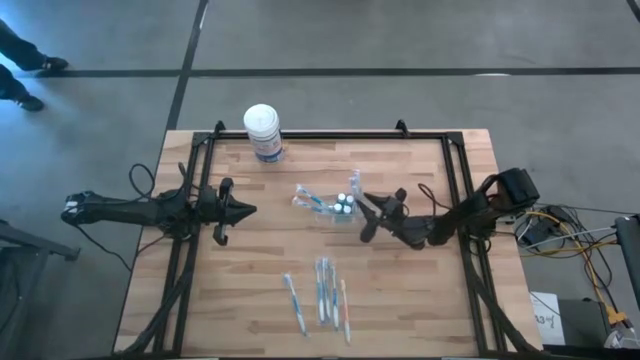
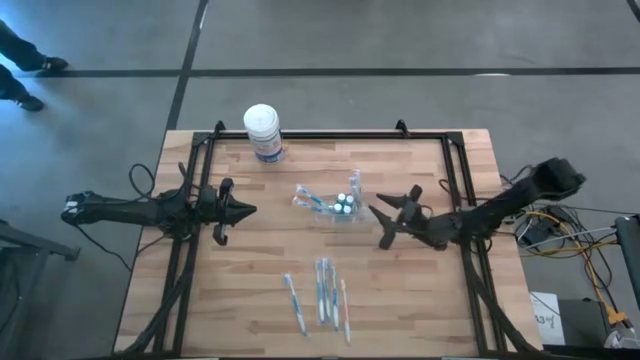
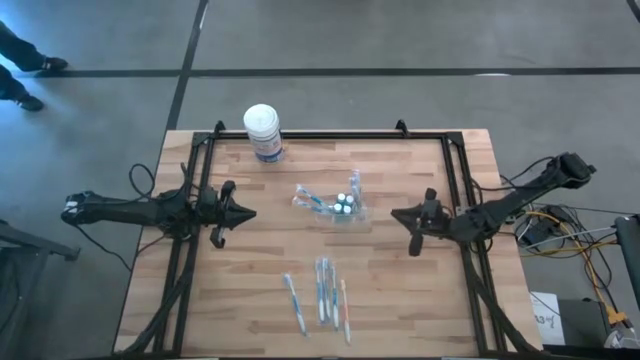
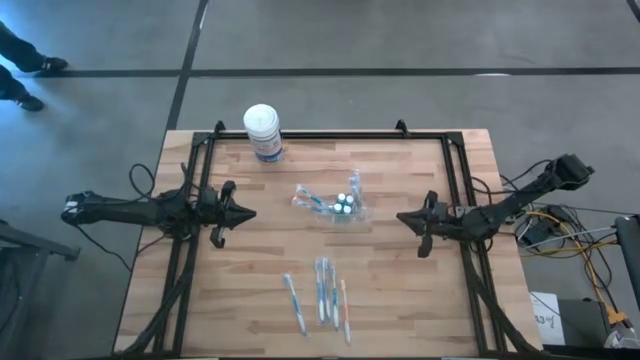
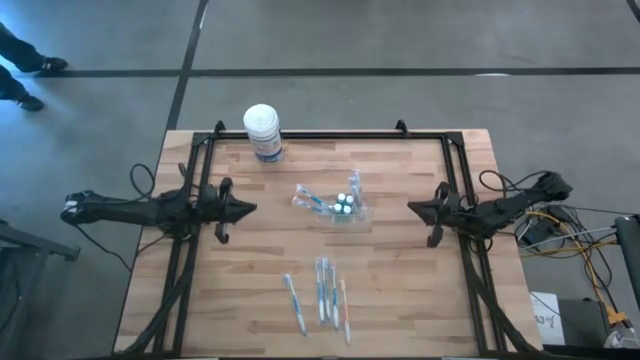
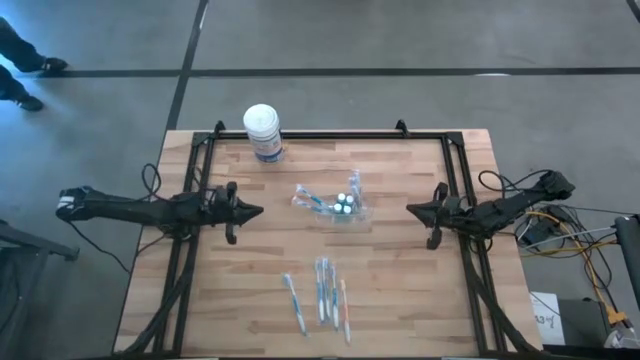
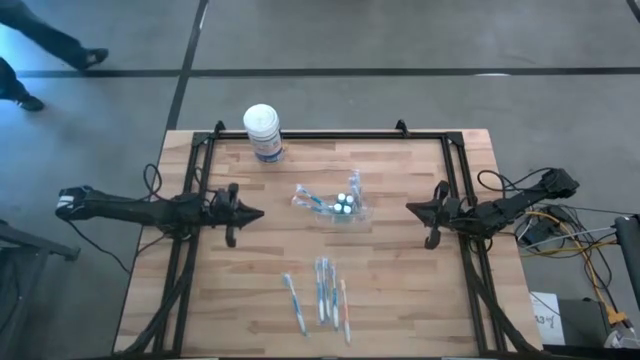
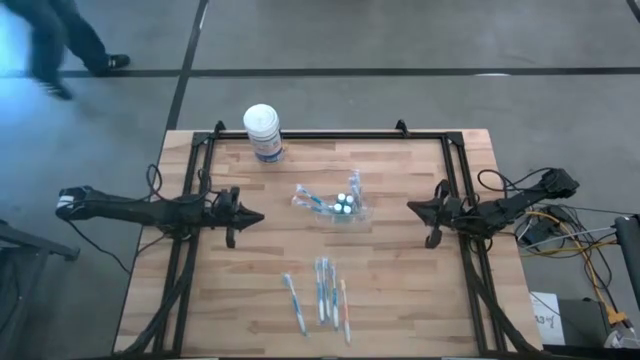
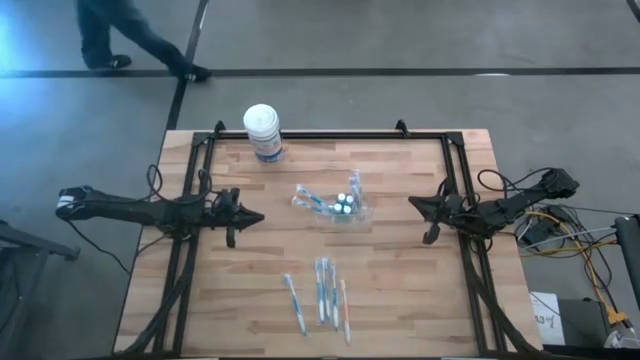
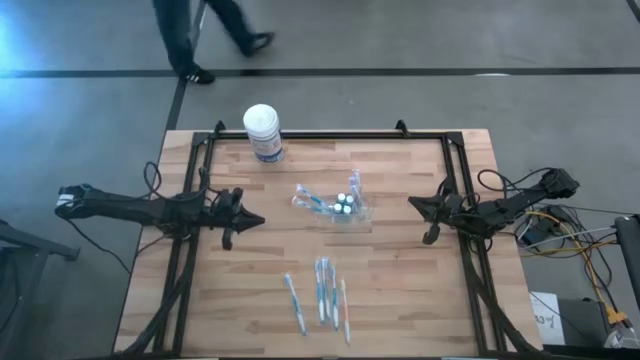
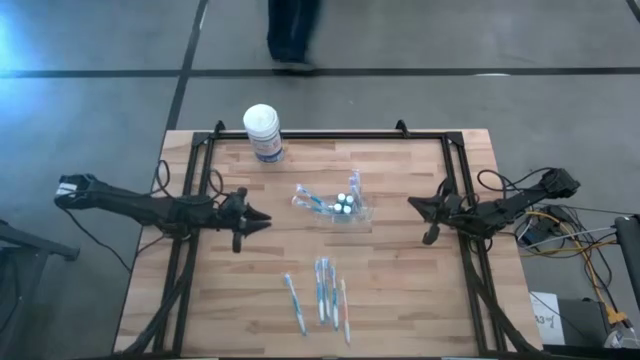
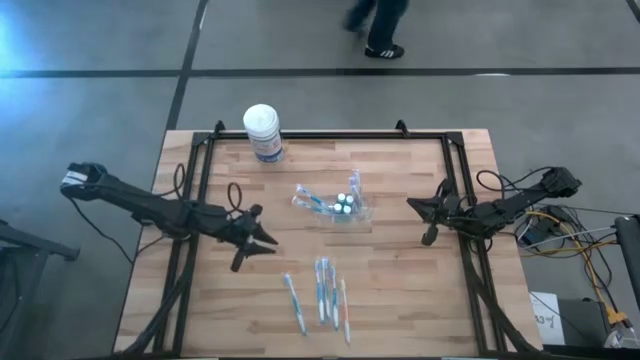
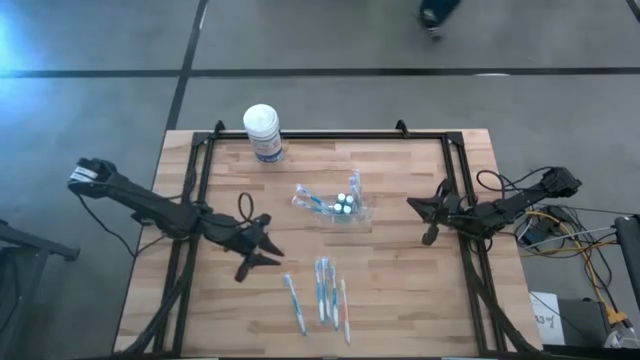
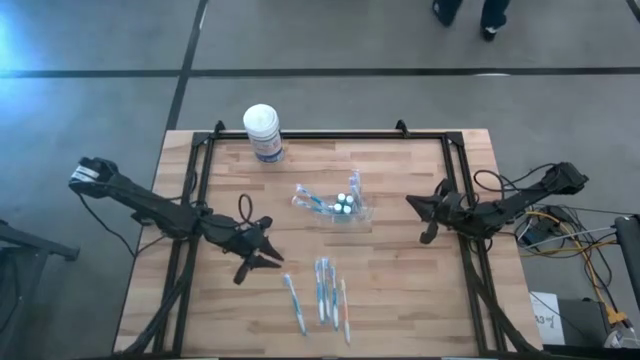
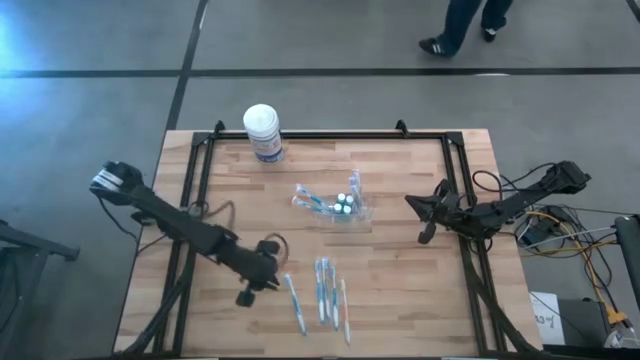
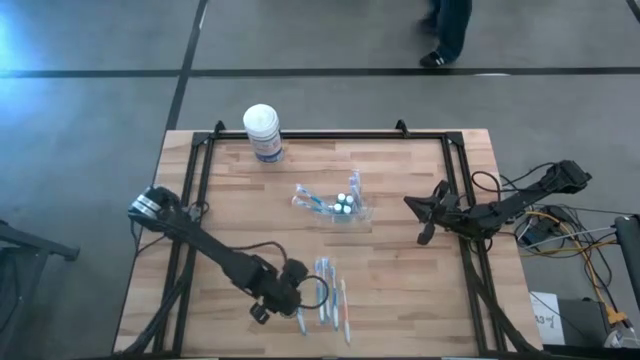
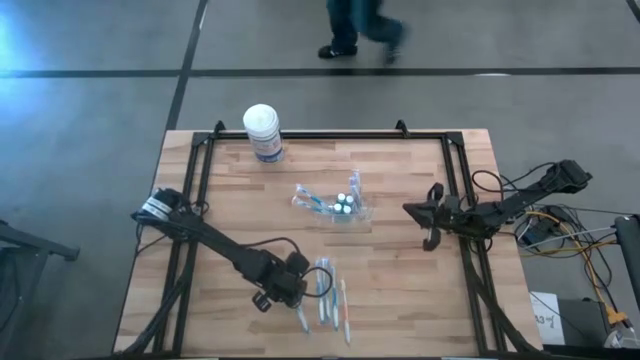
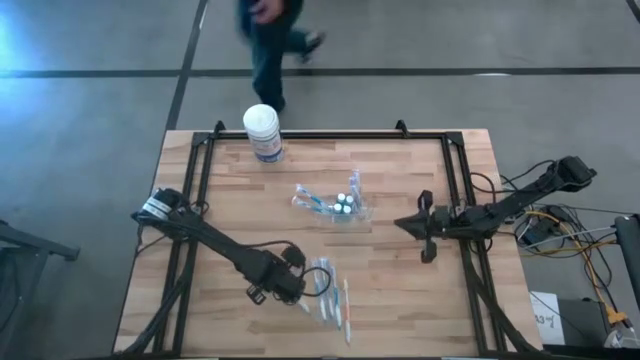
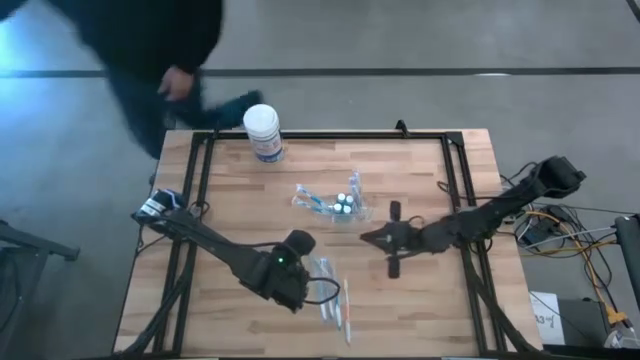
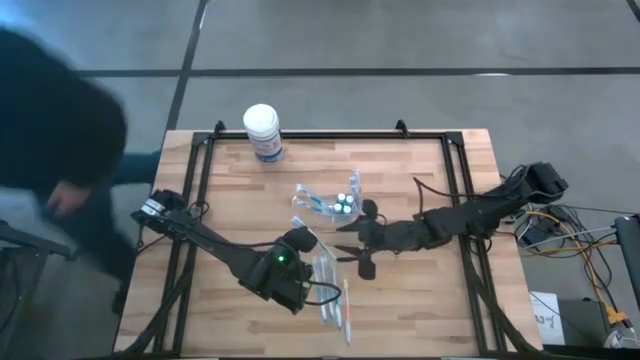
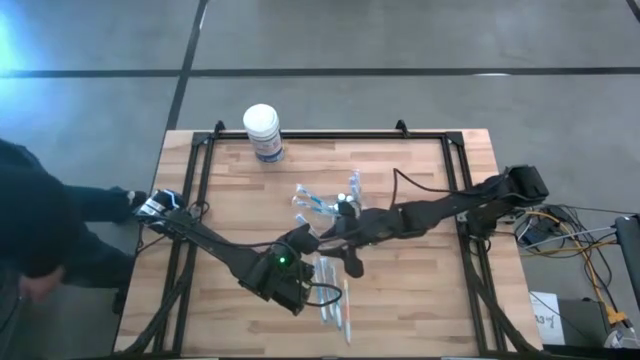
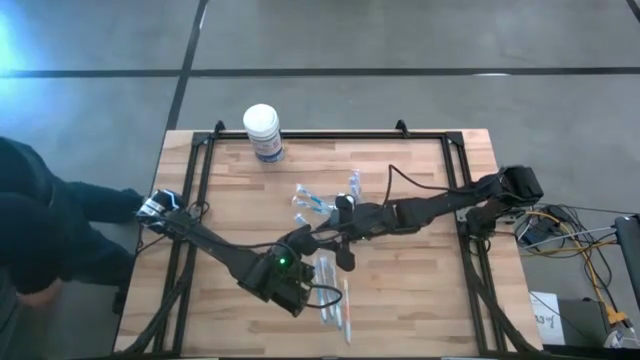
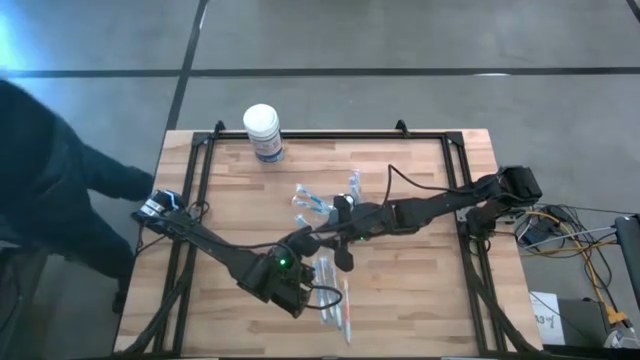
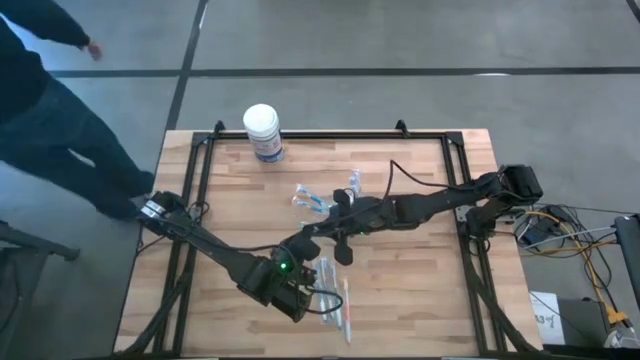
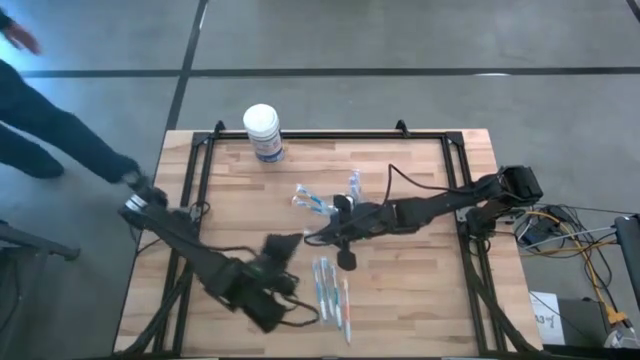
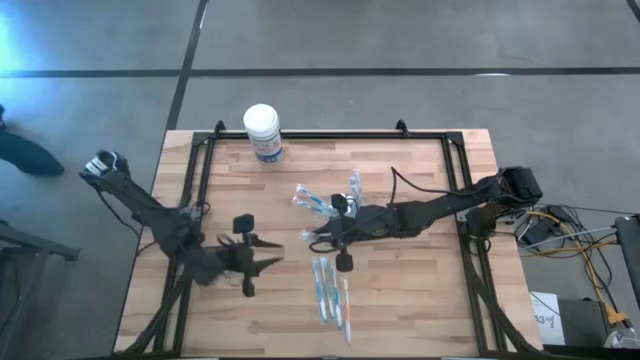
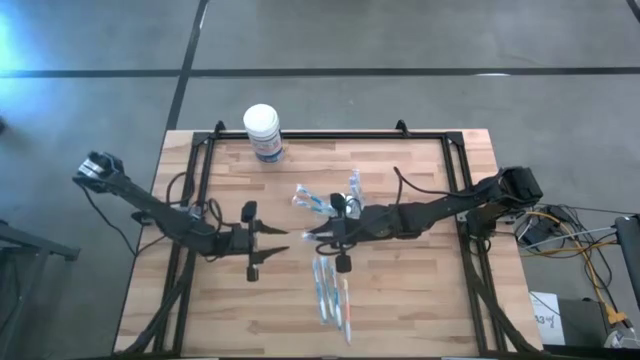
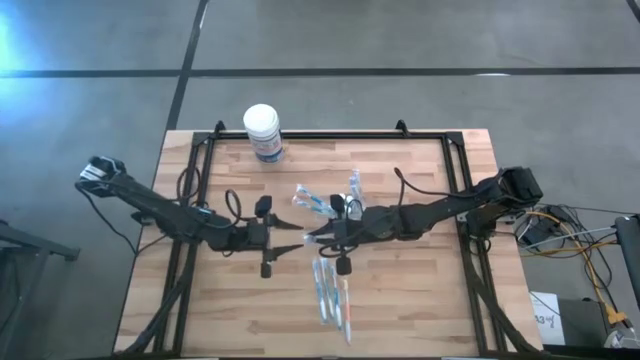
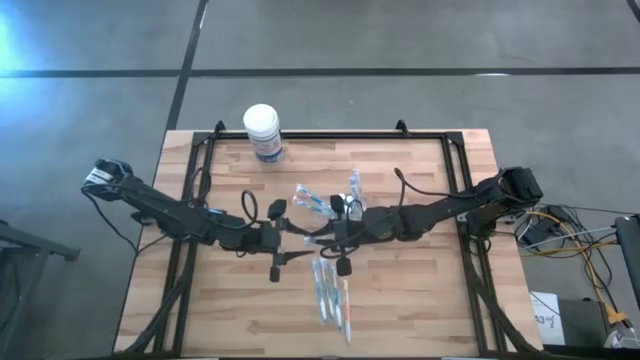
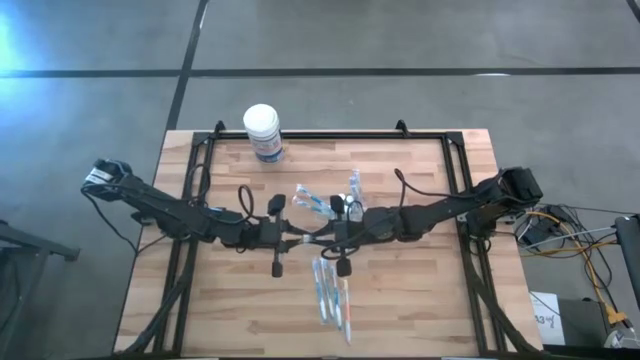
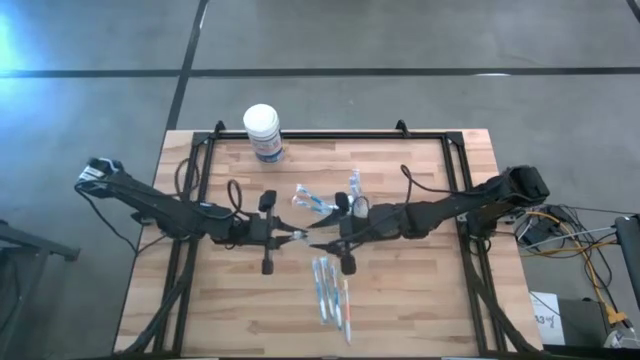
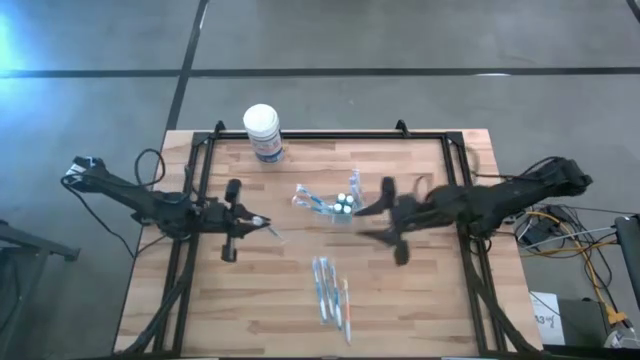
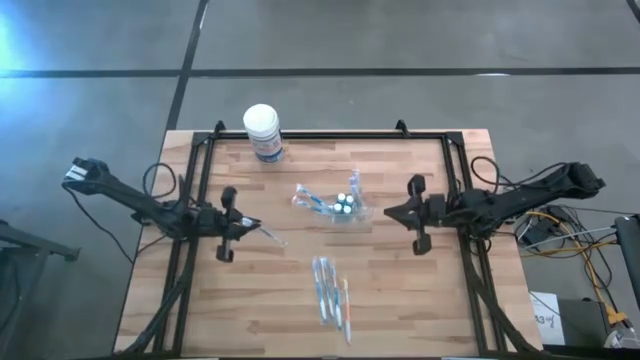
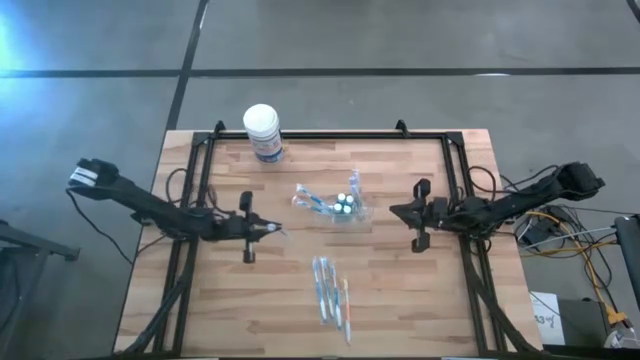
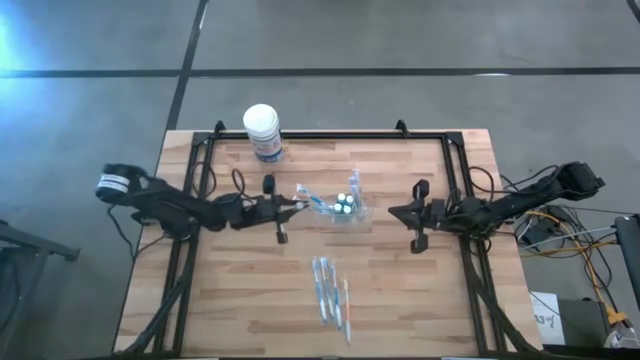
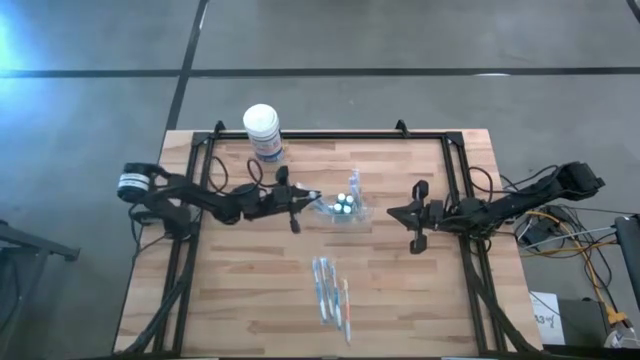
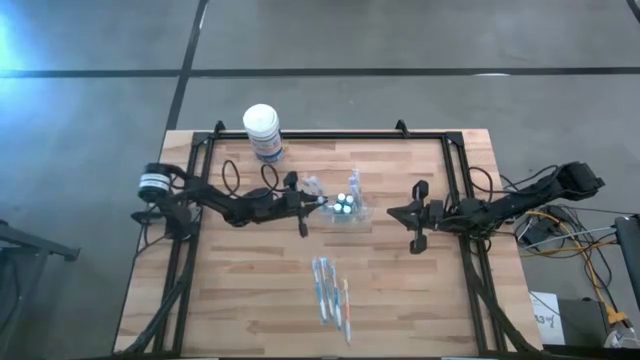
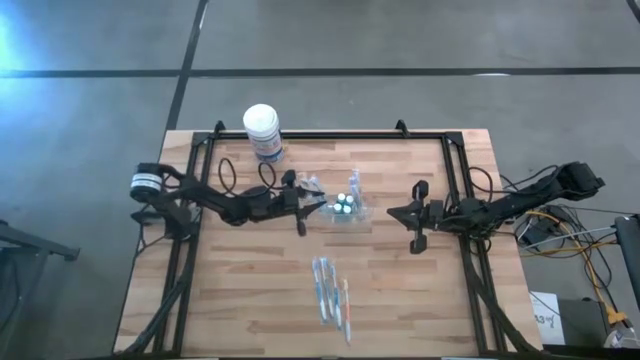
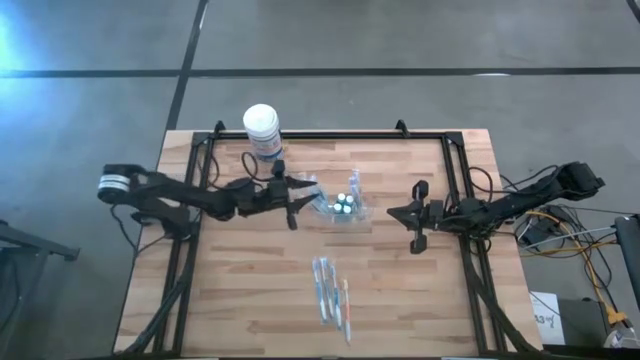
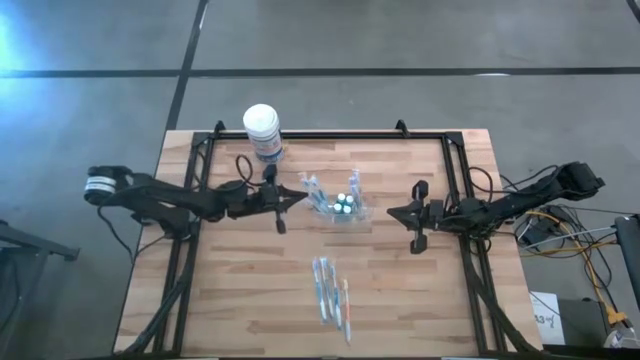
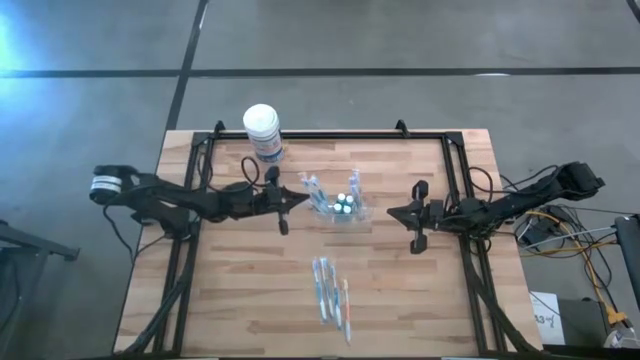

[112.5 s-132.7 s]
Task: Pick & Place toothbrushing station
Put the blue toothbrush into the transparent organizer
